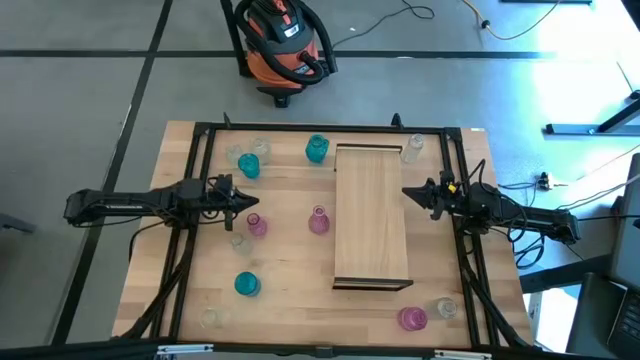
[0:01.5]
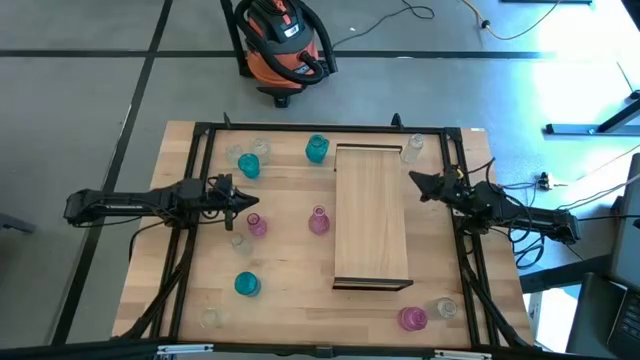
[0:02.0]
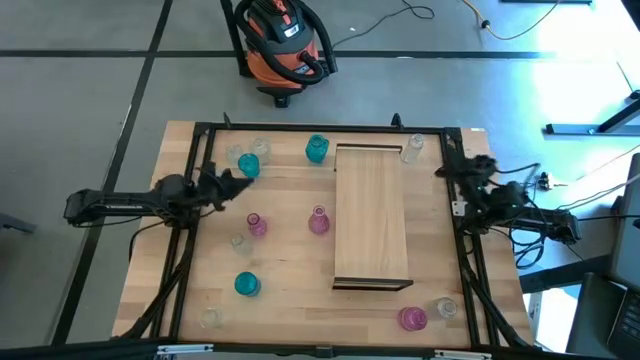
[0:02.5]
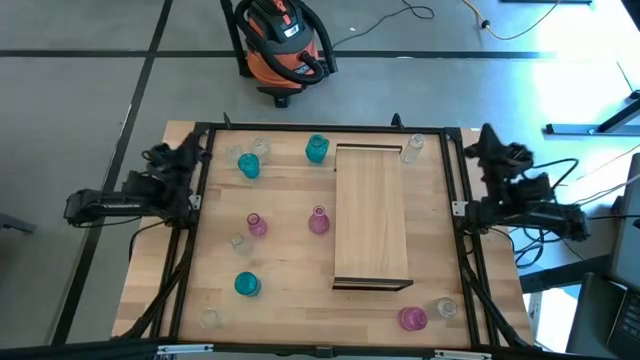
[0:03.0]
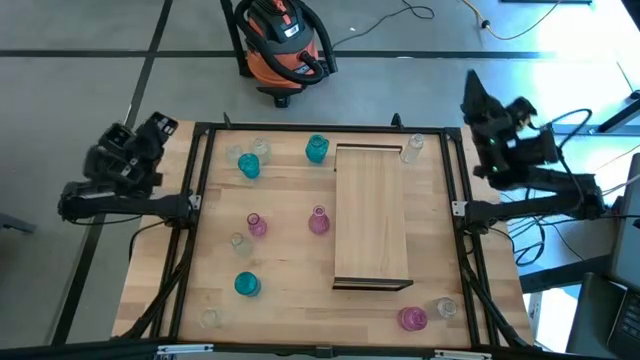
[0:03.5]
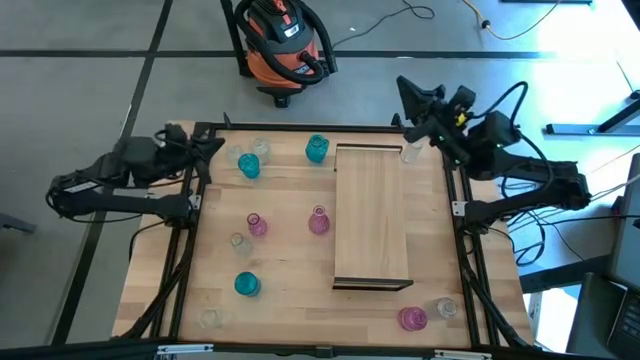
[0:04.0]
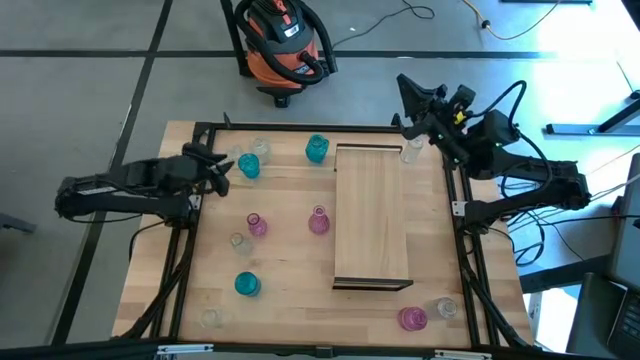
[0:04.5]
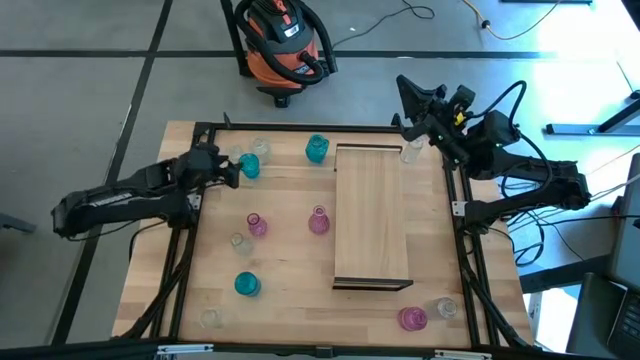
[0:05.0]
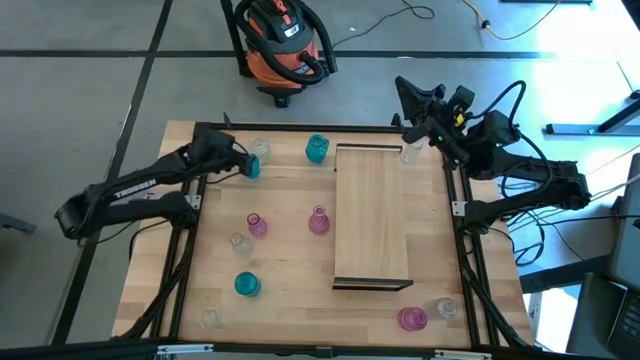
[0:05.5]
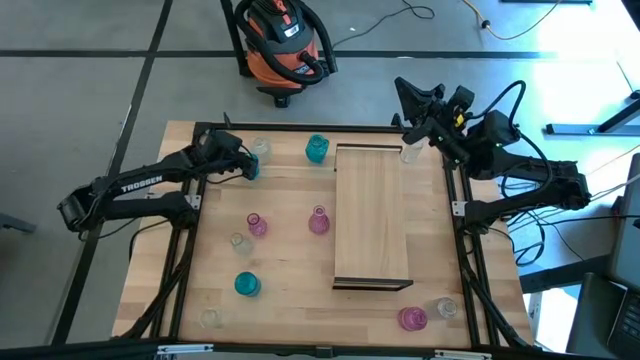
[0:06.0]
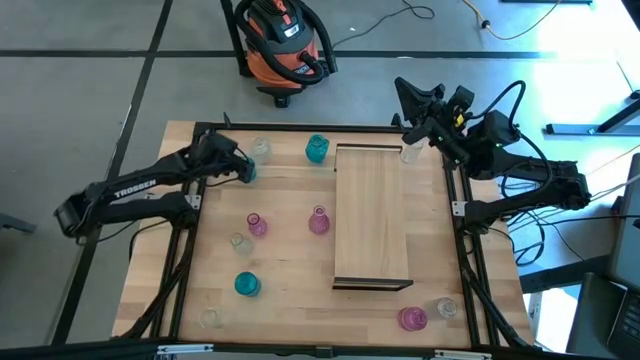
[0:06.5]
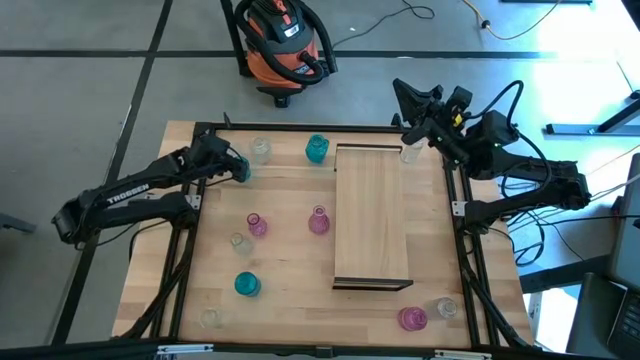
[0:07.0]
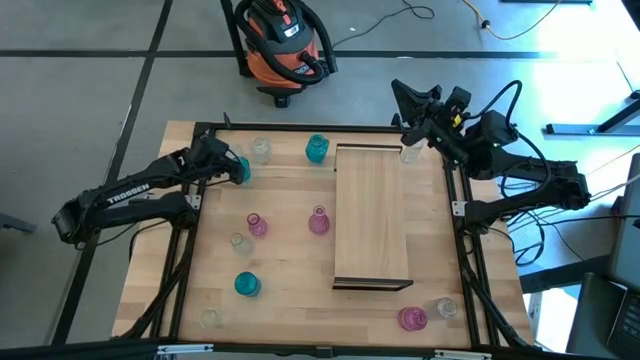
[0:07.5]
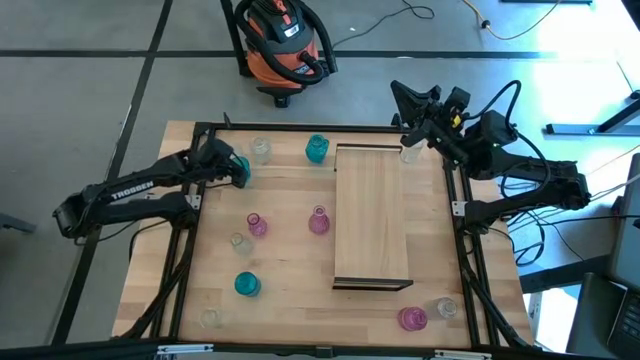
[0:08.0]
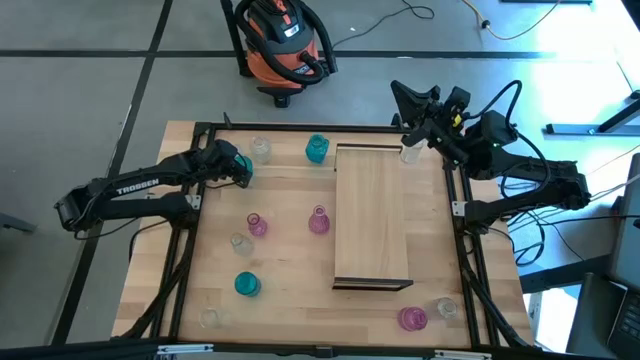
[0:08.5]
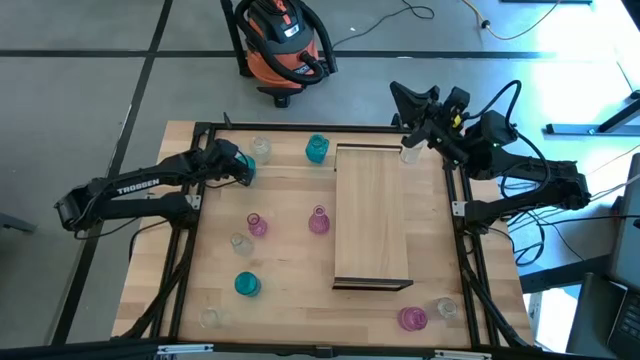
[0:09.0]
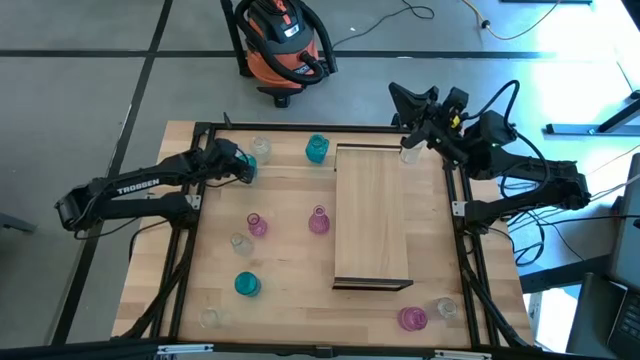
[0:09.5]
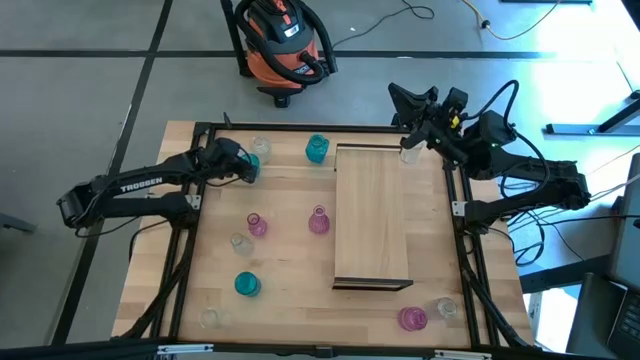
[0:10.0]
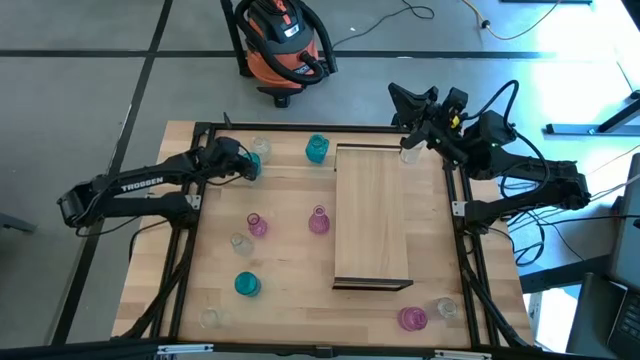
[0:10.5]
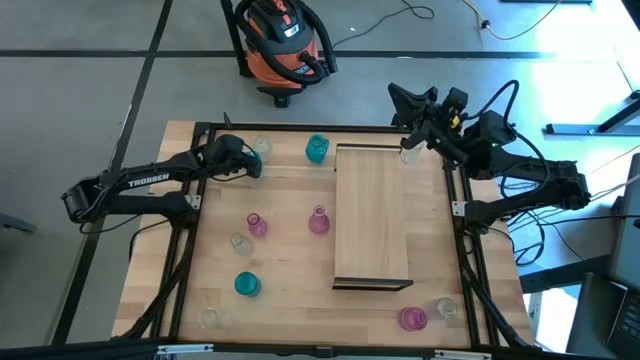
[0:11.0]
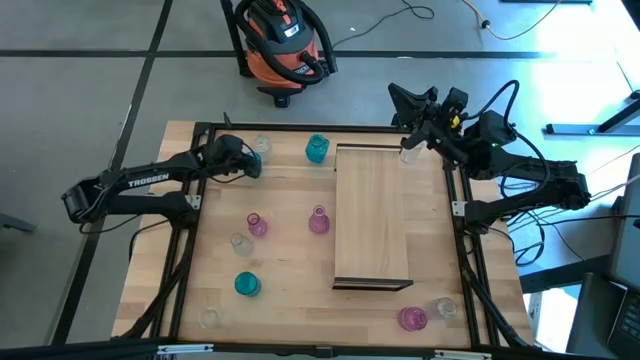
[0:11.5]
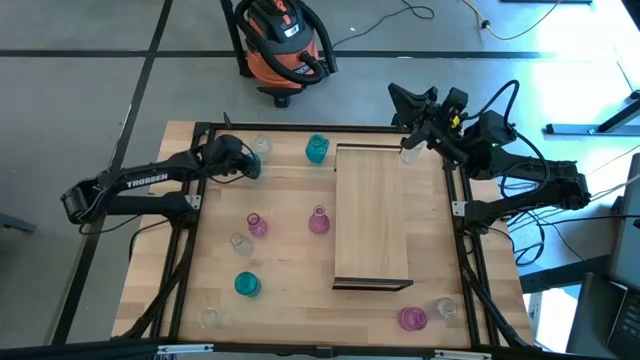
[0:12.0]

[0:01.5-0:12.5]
Task: sort vases onto shelf
Put the blue vase on the shelf
